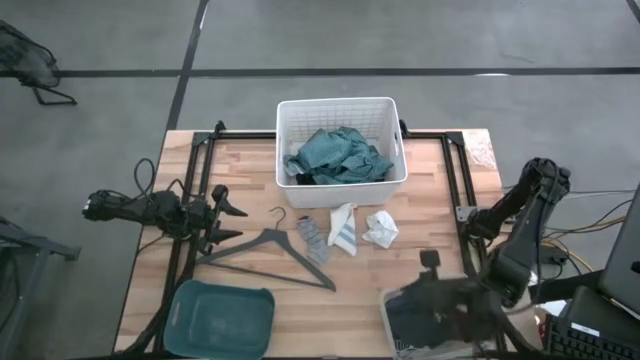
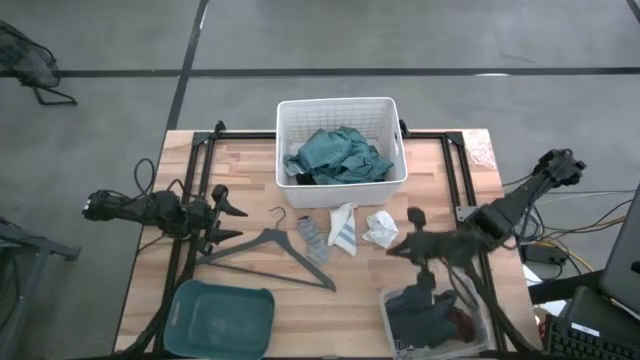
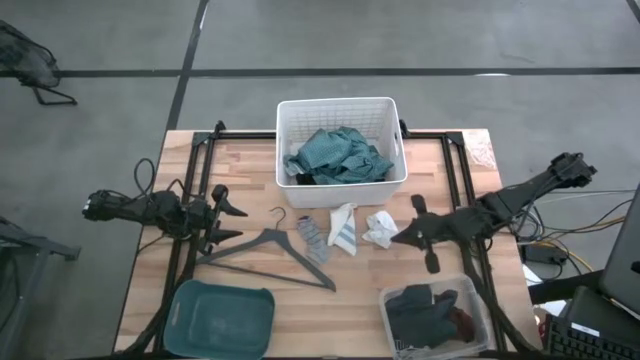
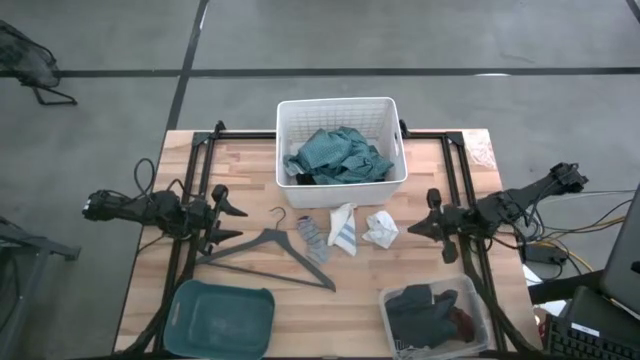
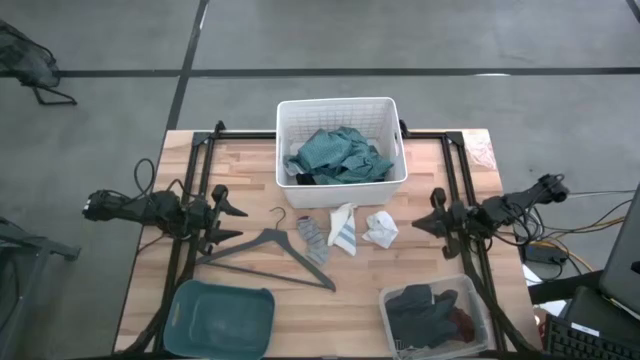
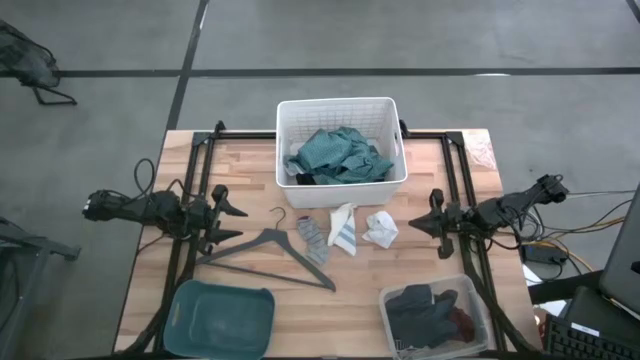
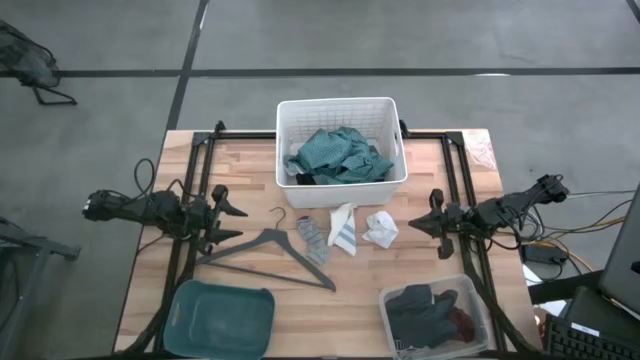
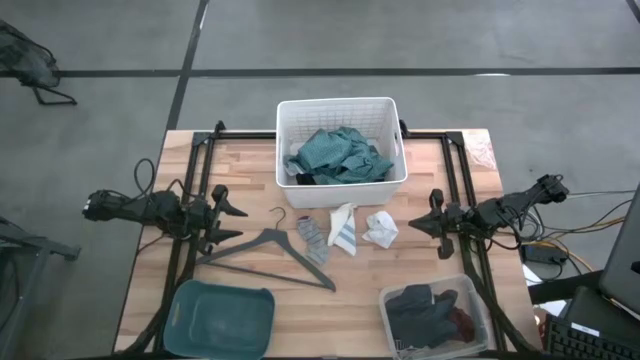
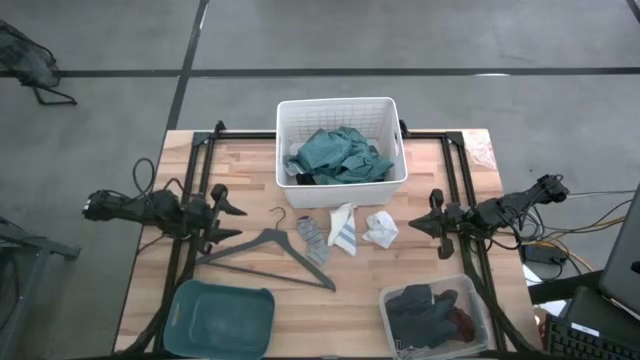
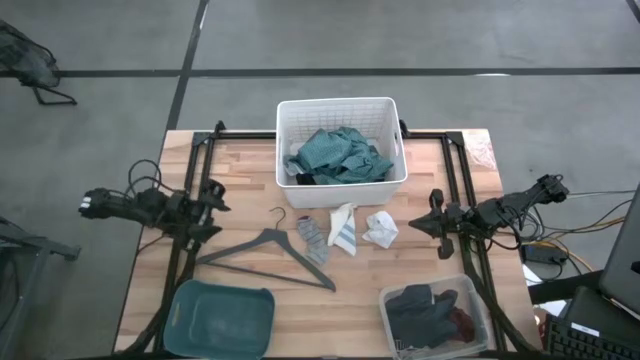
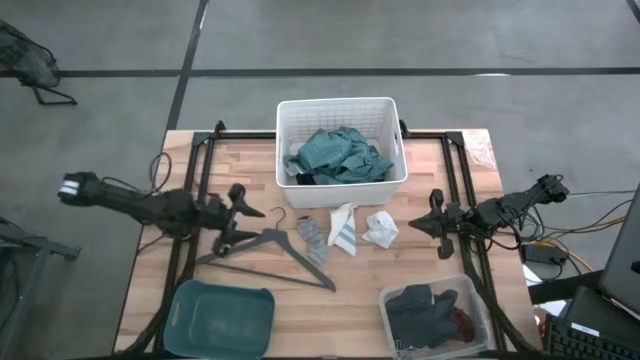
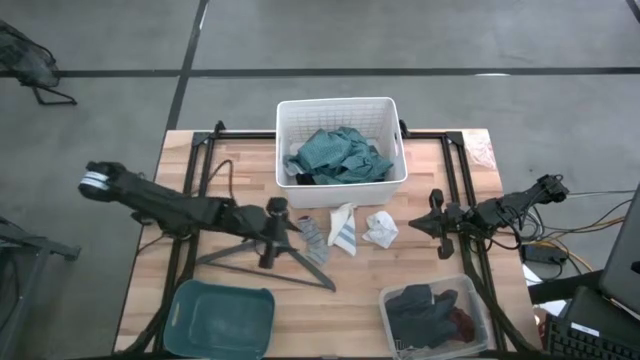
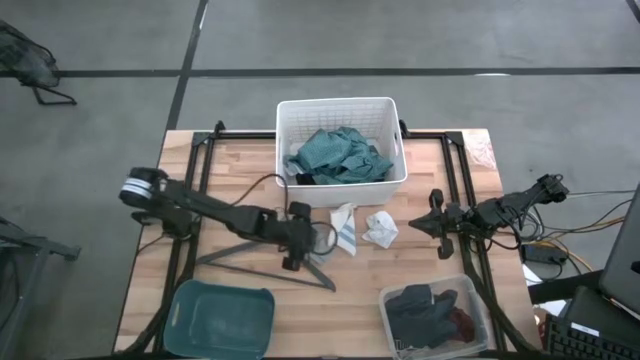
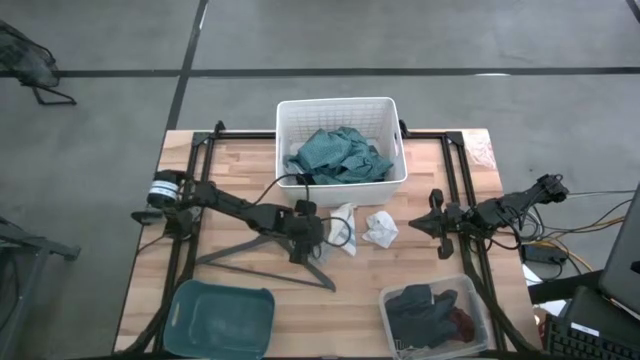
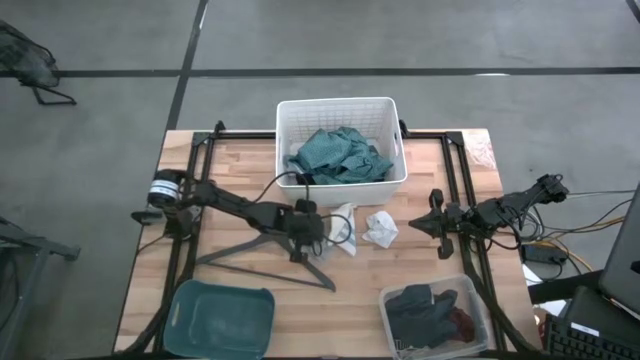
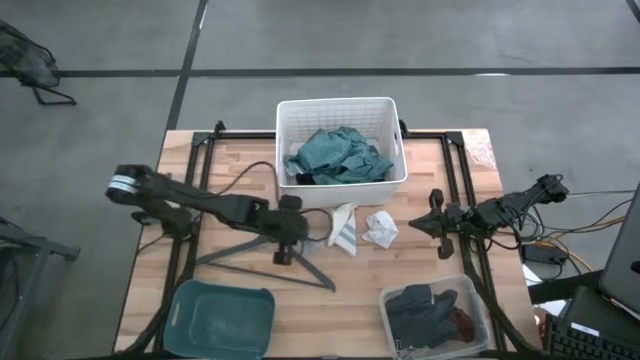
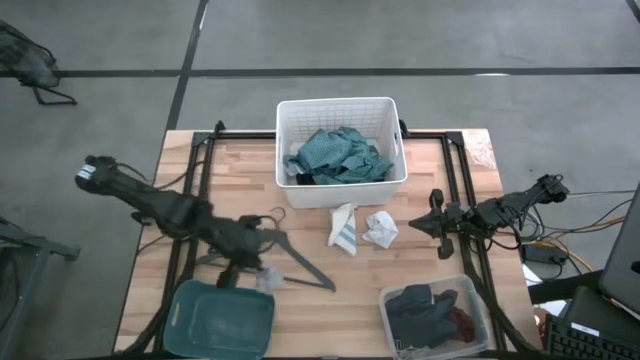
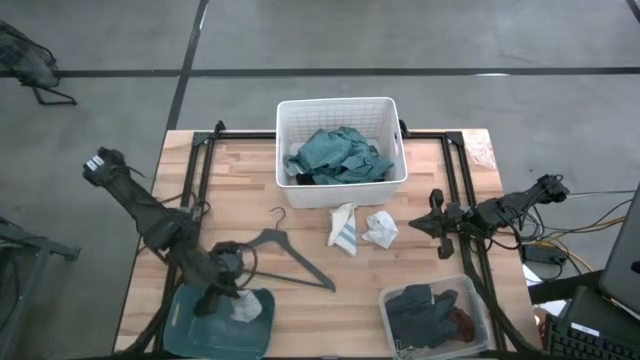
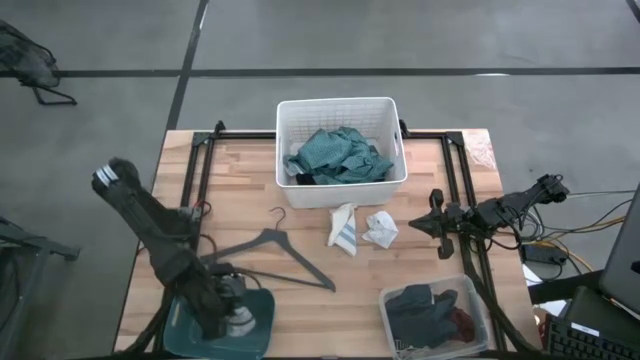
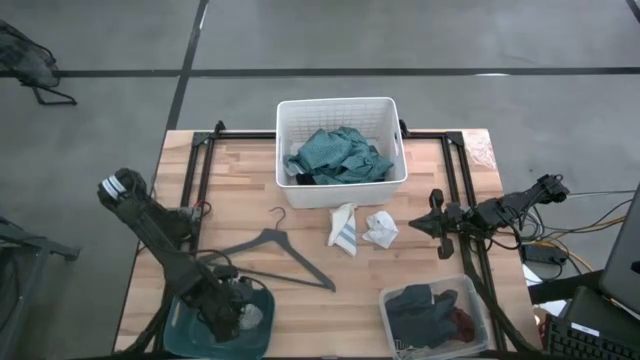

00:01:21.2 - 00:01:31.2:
Task: Pick & Place Cloths
Put the gray sock into the blue bin

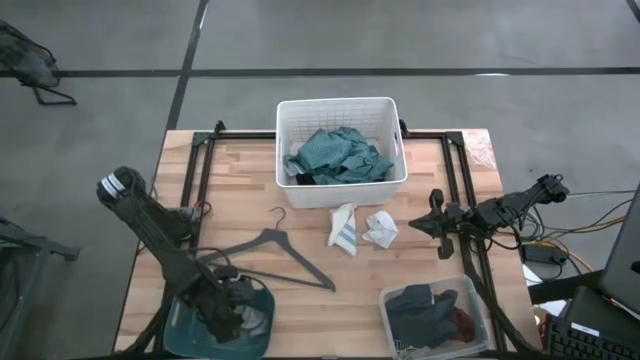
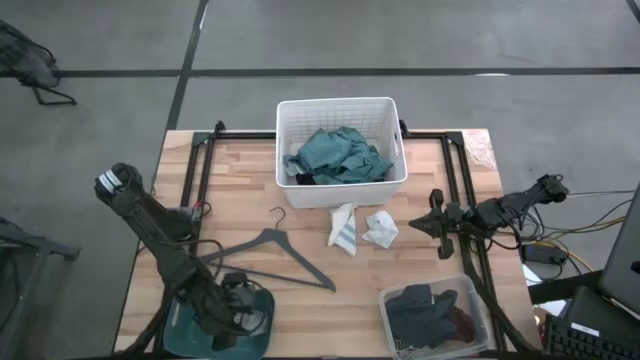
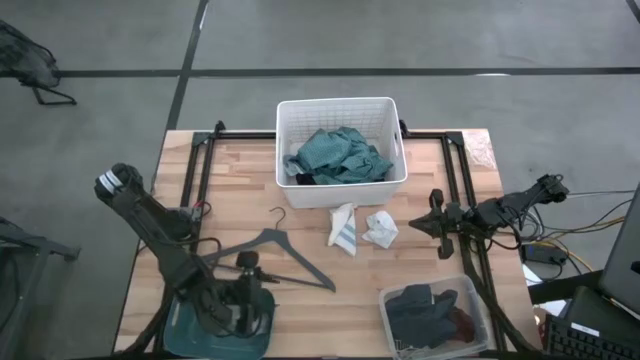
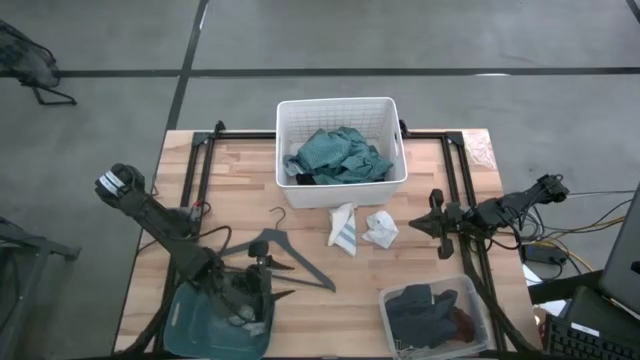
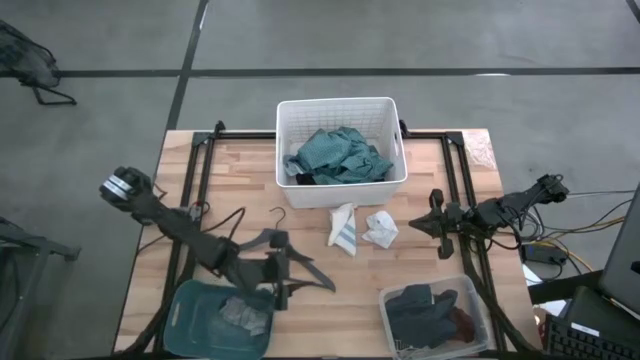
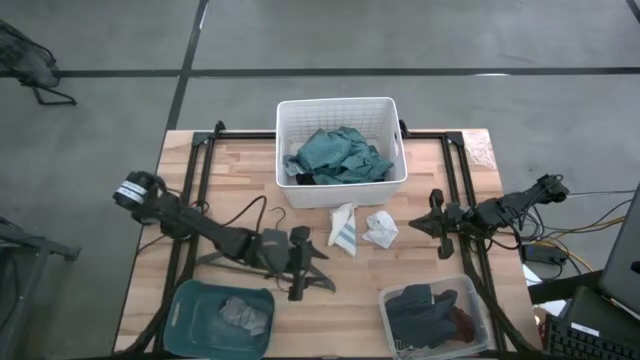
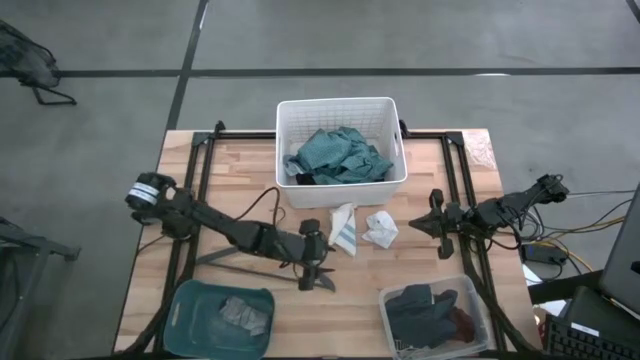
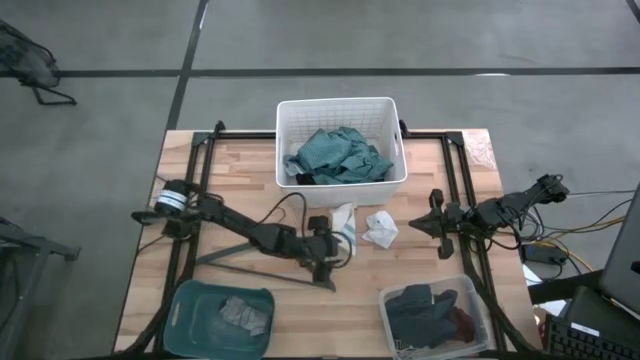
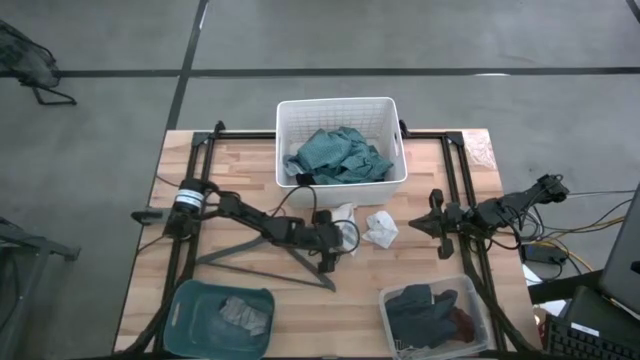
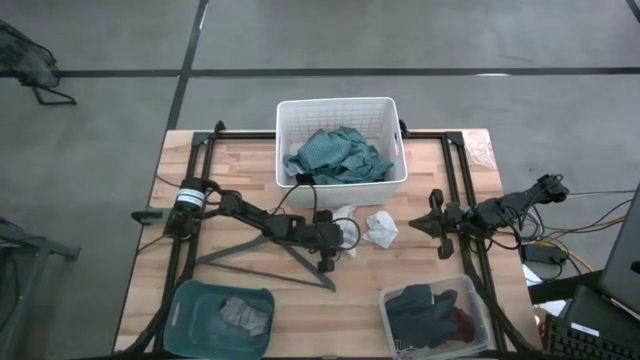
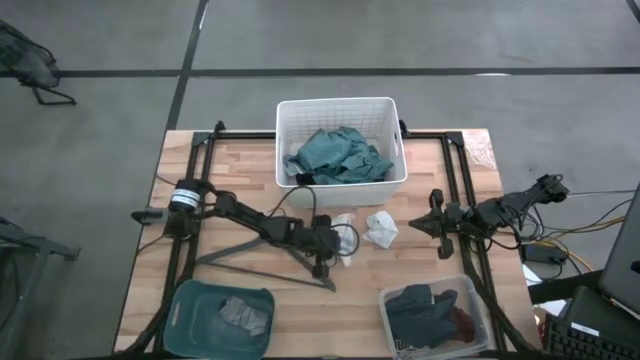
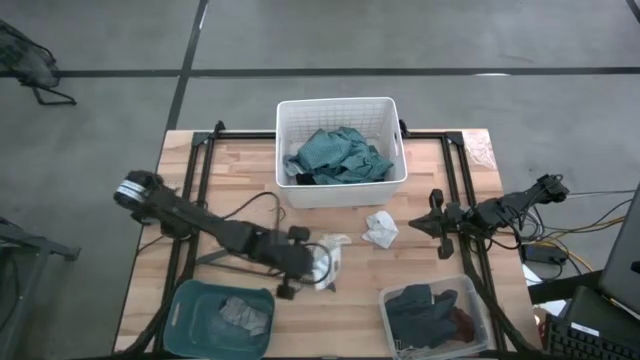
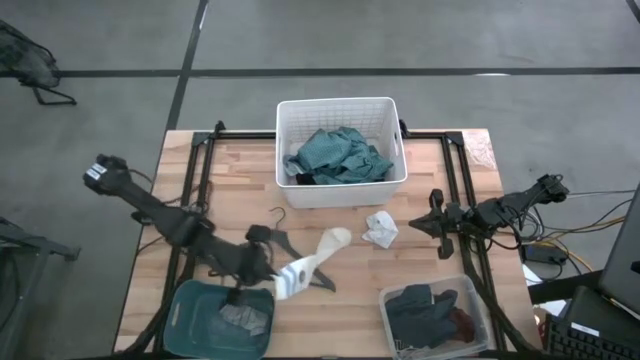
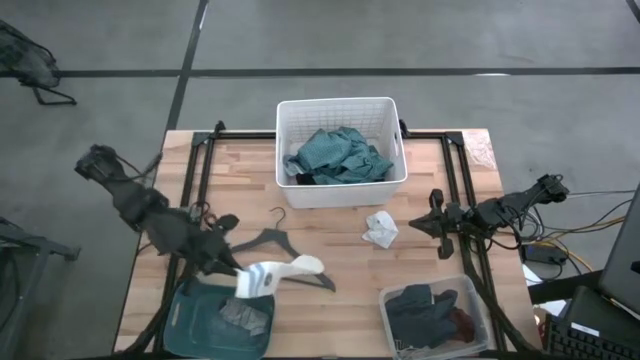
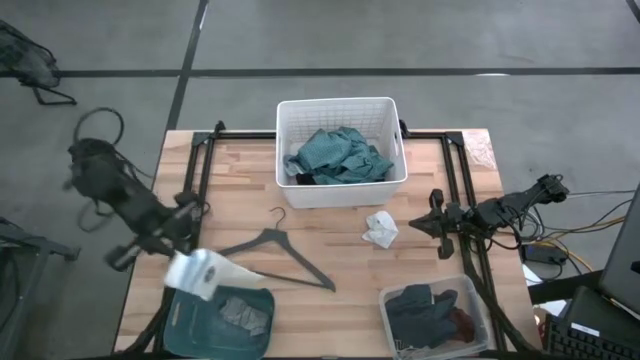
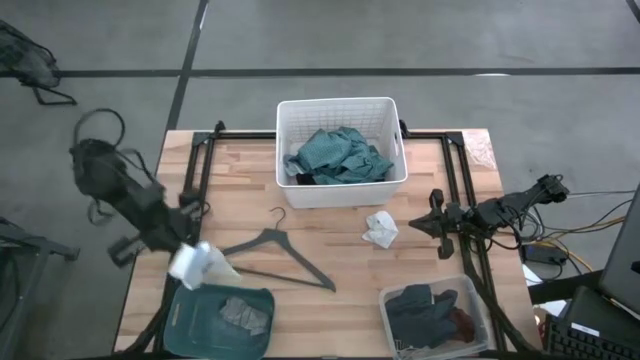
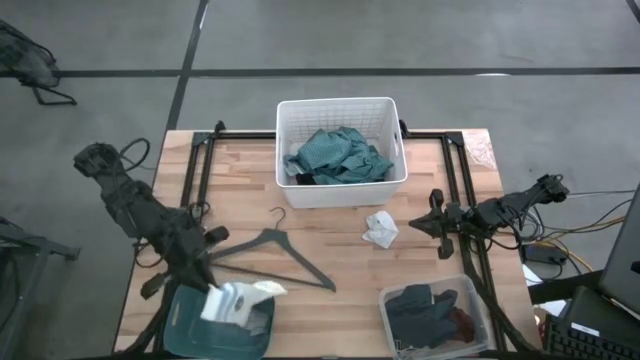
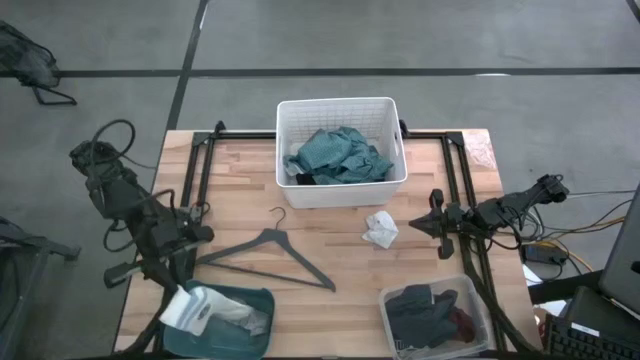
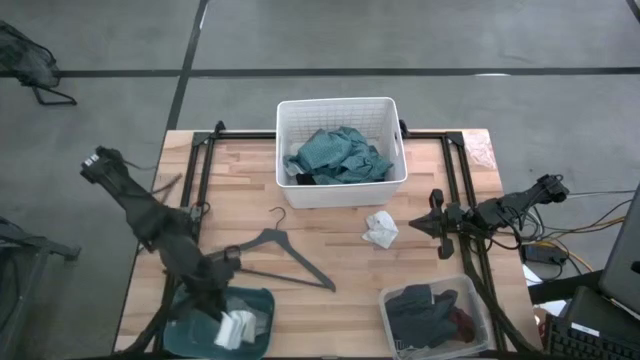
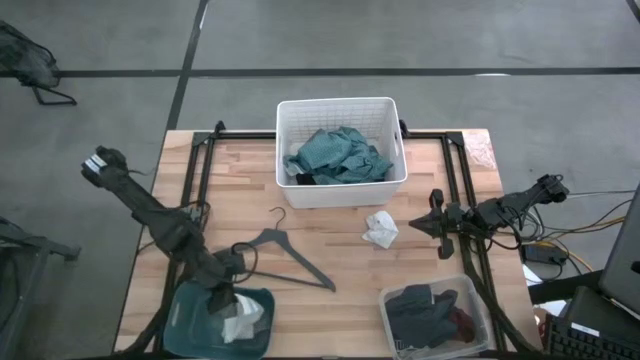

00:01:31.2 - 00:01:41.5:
Put the white striped sock into the blue bin

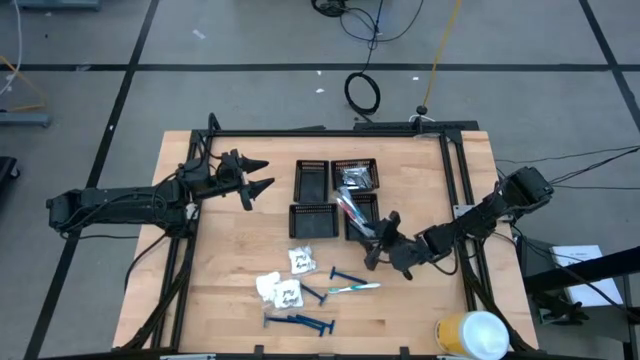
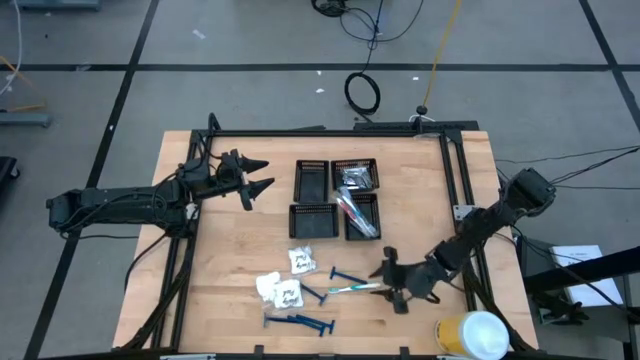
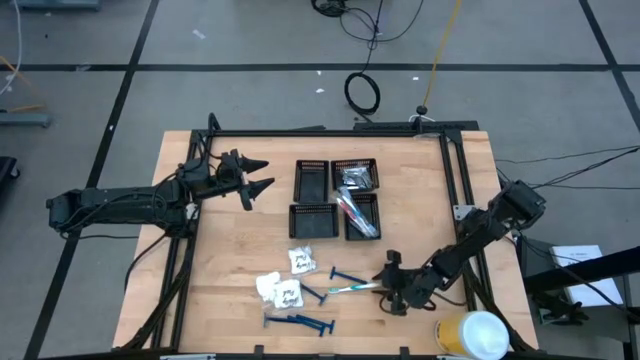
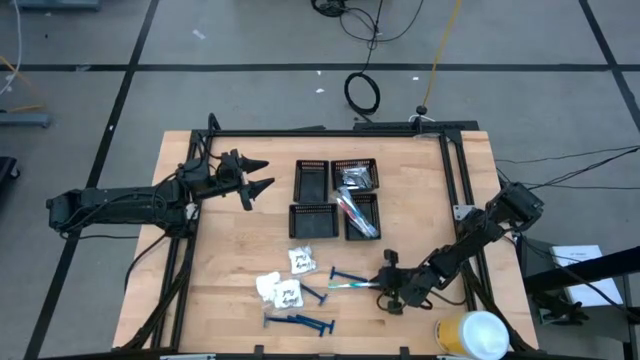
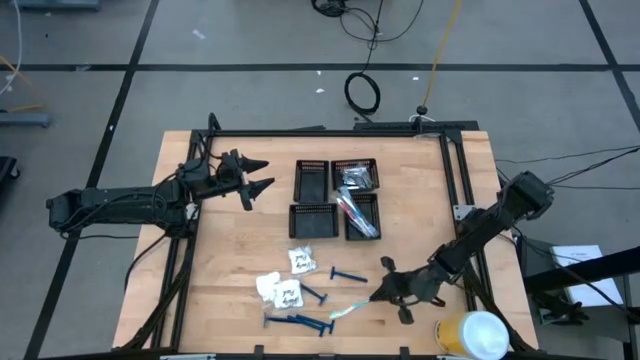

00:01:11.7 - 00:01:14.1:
Task: Pick & Place Travel size toiletries
Put the green toothbrush into the bottom right black bin
